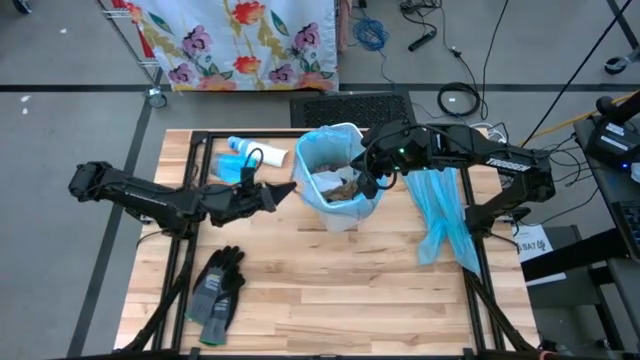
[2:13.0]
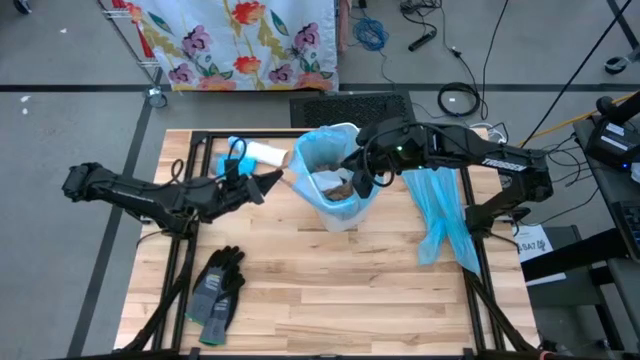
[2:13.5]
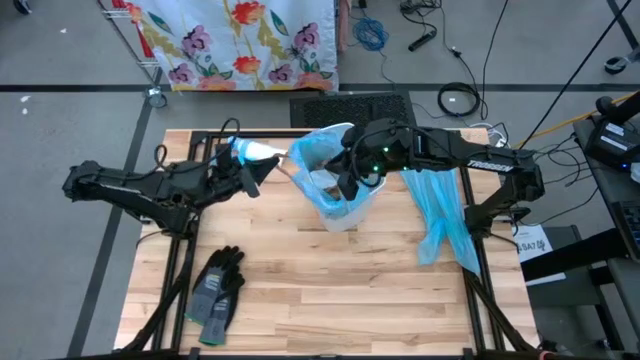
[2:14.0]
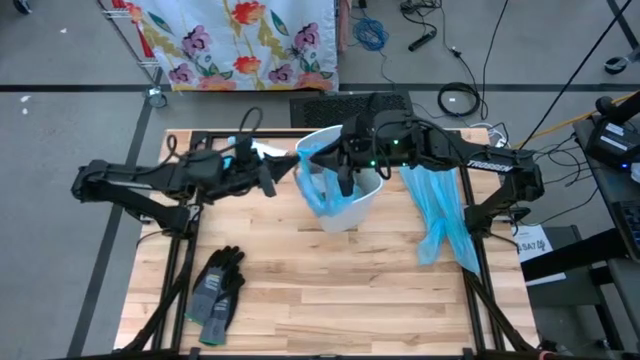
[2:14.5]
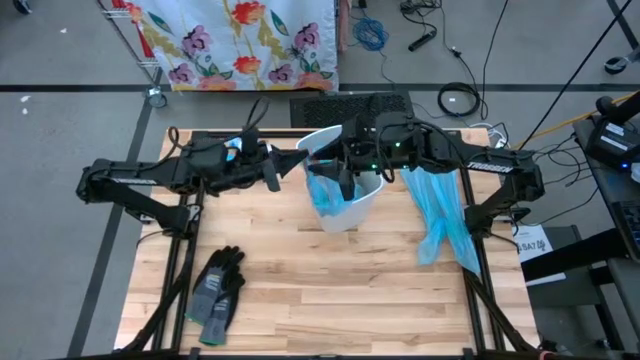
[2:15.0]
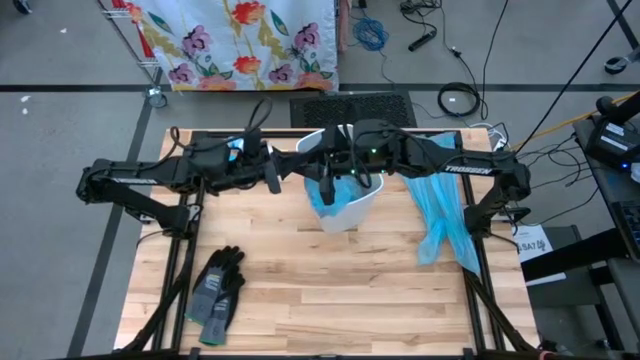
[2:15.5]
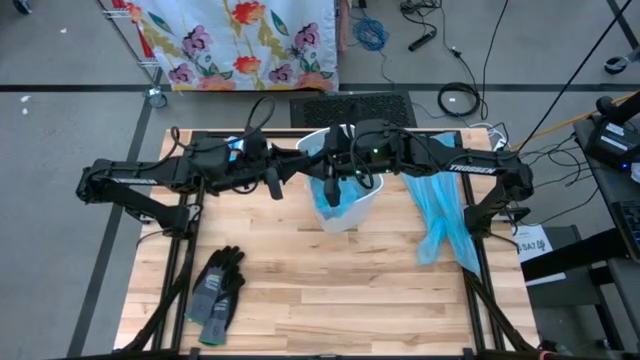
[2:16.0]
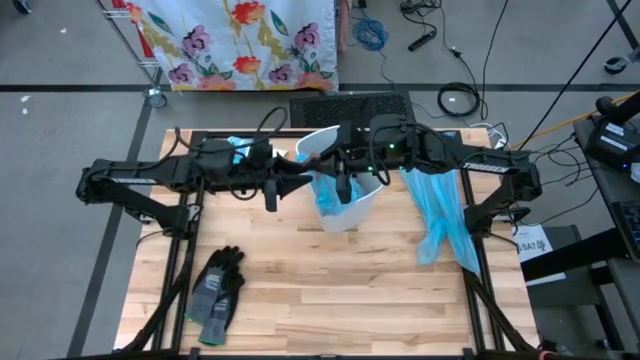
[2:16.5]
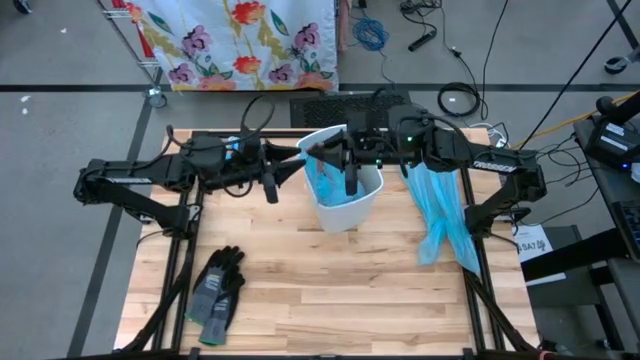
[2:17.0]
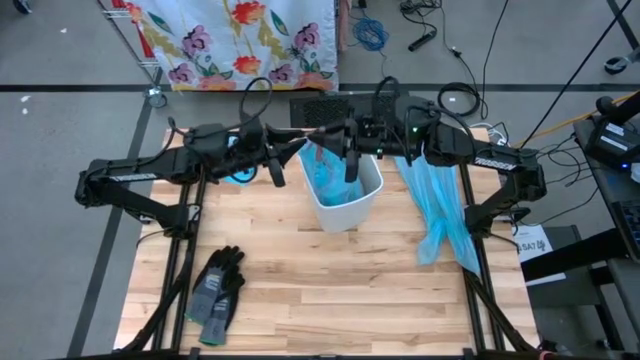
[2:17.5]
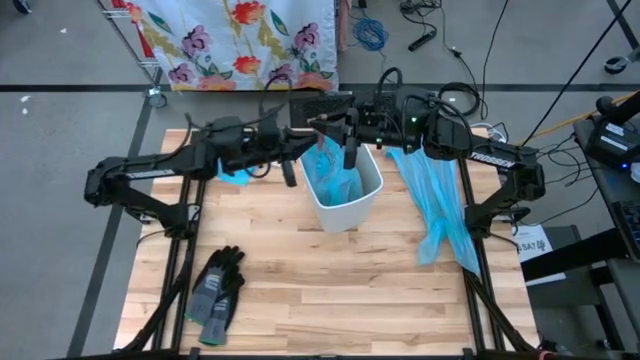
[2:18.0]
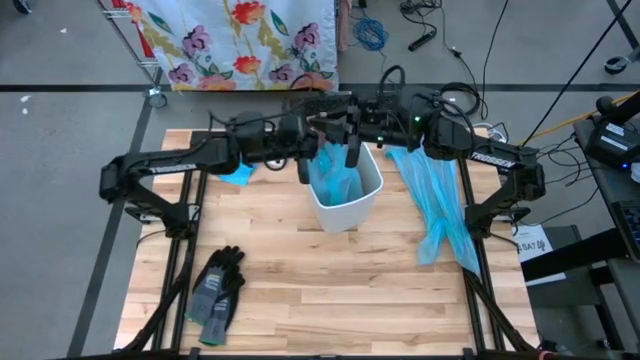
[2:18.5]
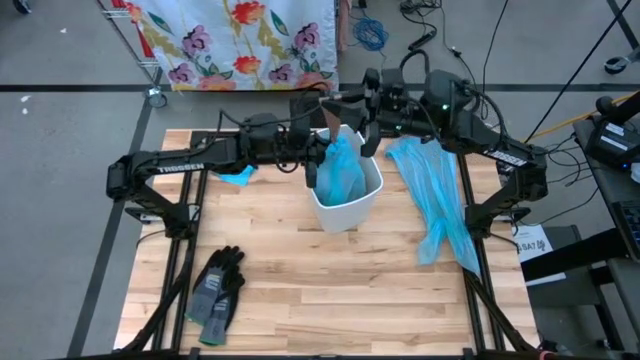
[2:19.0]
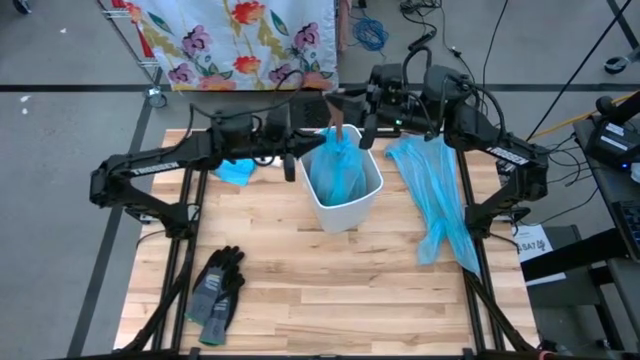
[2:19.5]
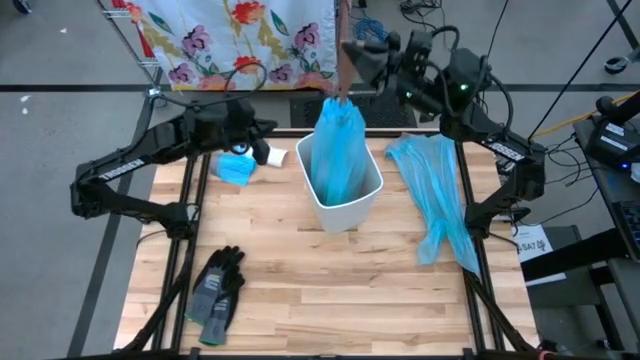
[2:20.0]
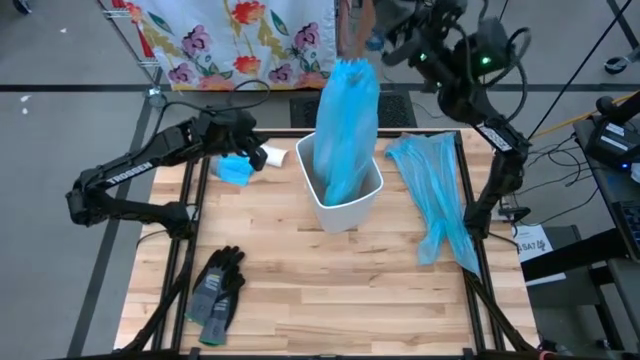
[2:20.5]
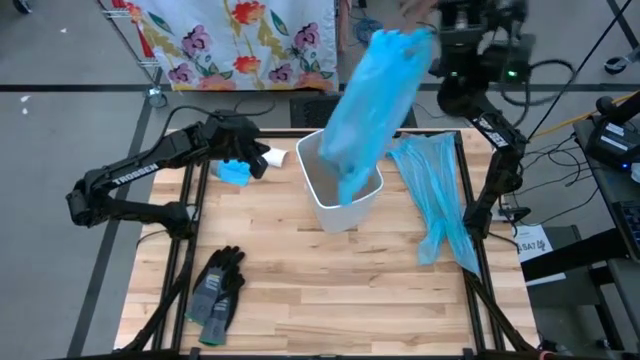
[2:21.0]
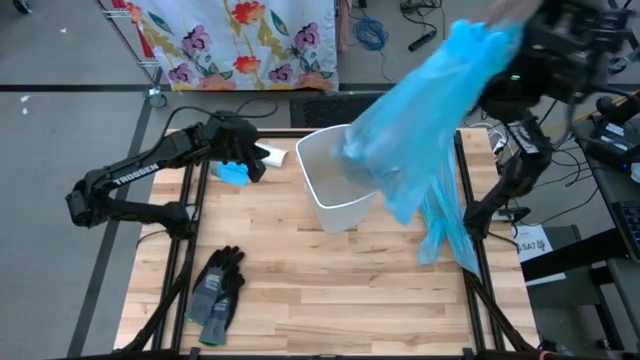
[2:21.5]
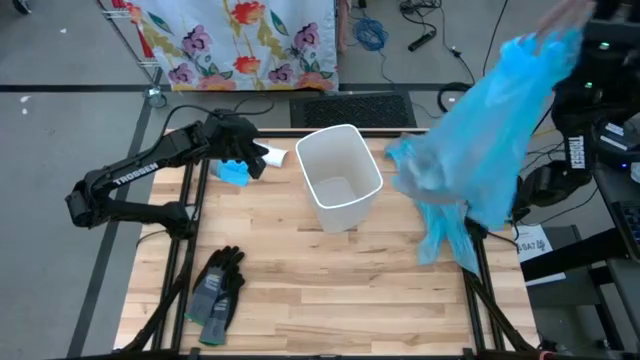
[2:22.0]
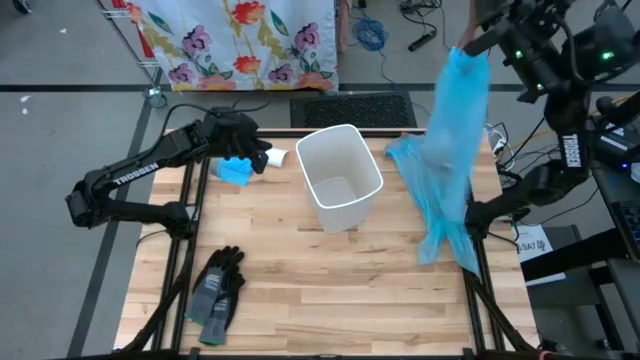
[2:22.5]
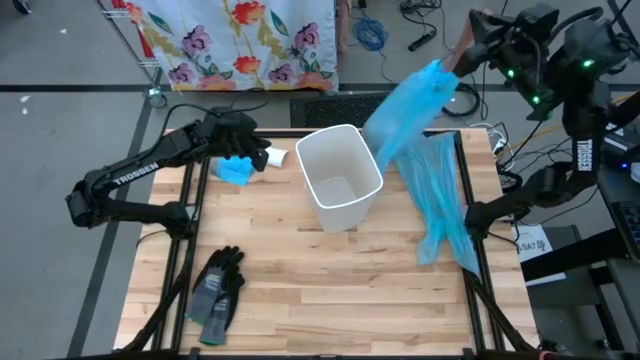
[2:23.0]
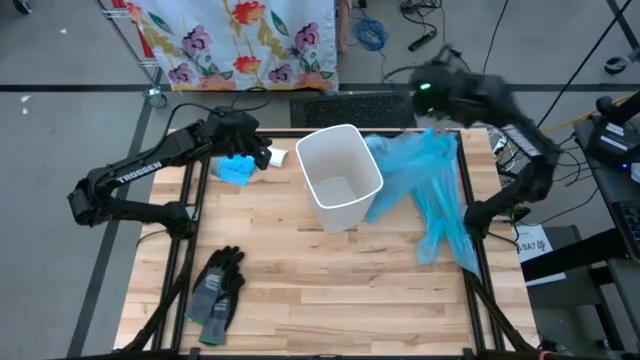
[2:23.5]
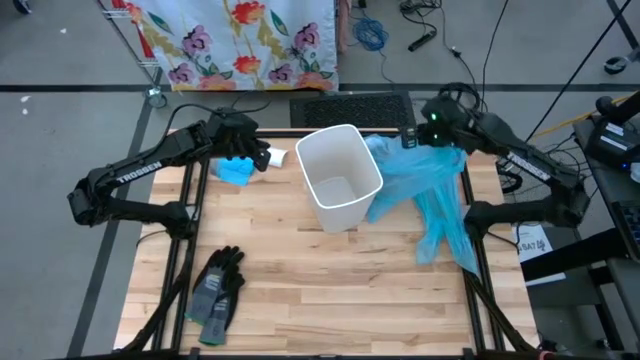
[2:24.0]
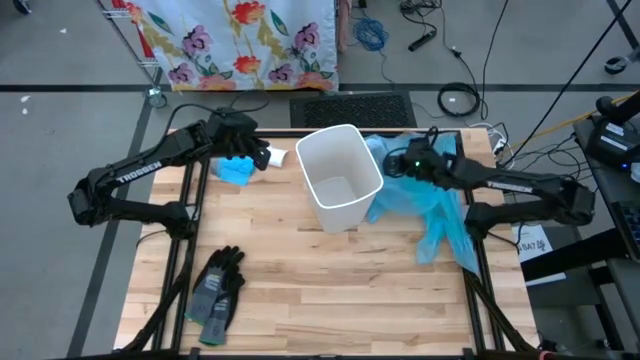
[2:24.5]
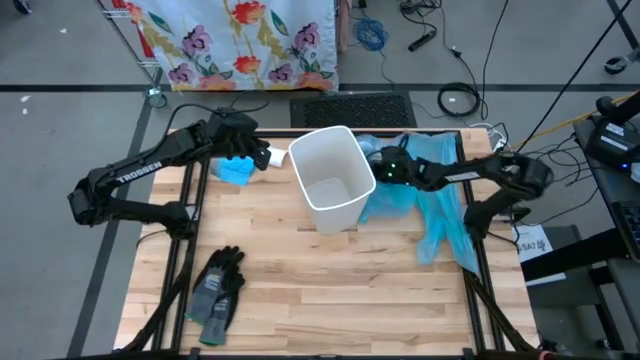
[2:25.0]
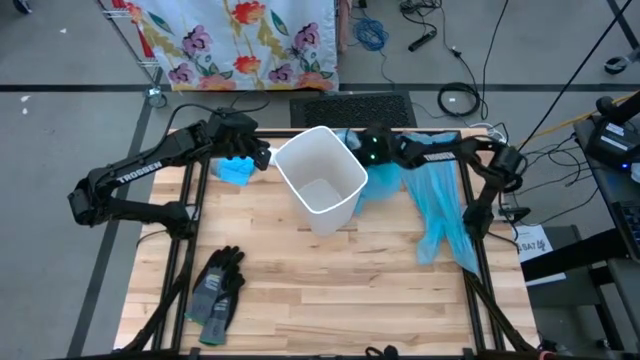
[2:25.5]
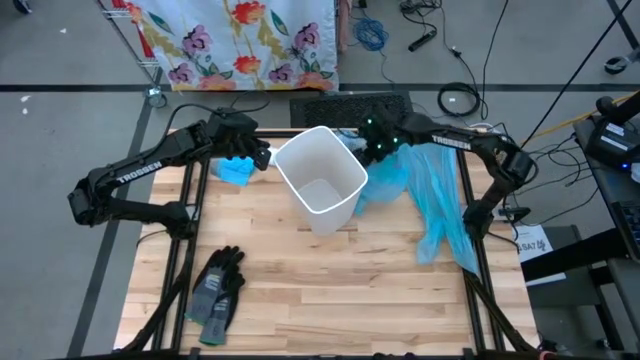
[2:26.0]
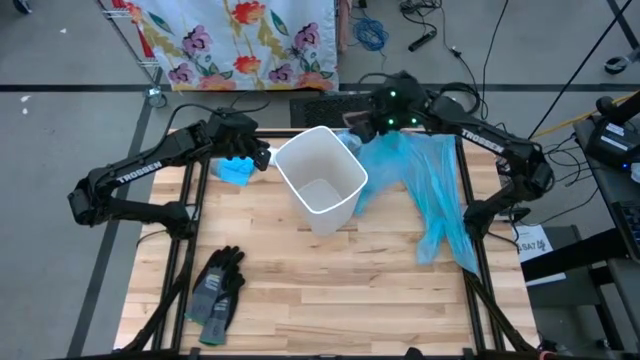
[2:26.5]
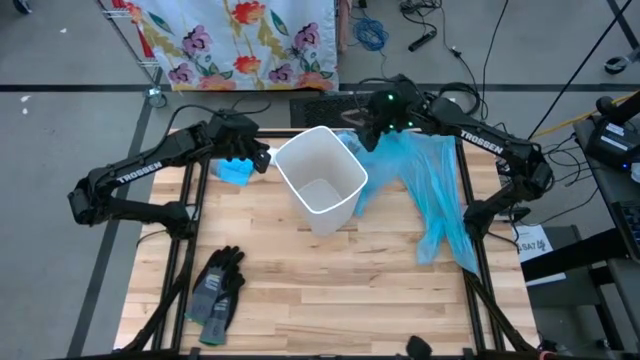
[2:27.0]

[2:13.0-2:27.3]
Task: place trash/remove bag and relplace
Remove trash bag from the trash bin

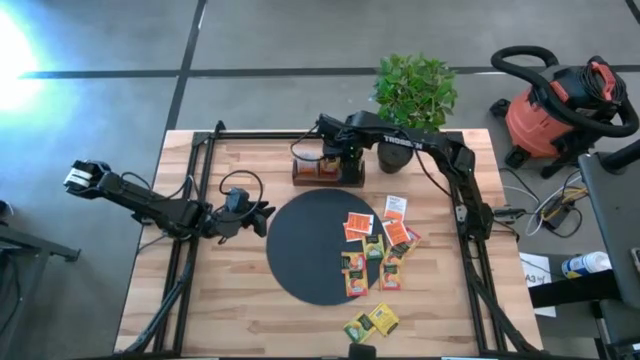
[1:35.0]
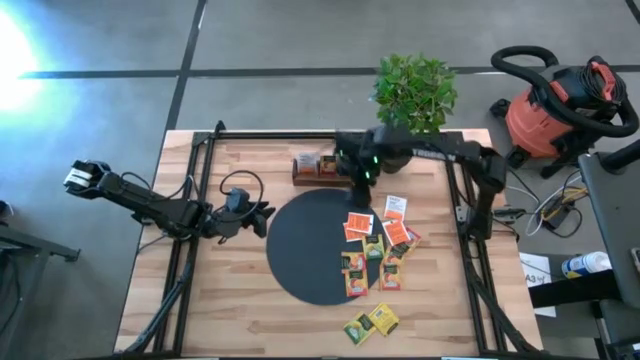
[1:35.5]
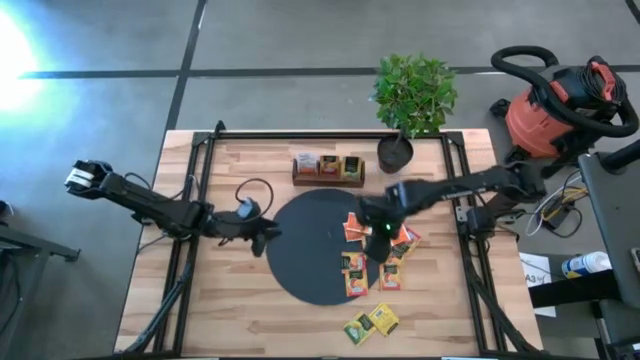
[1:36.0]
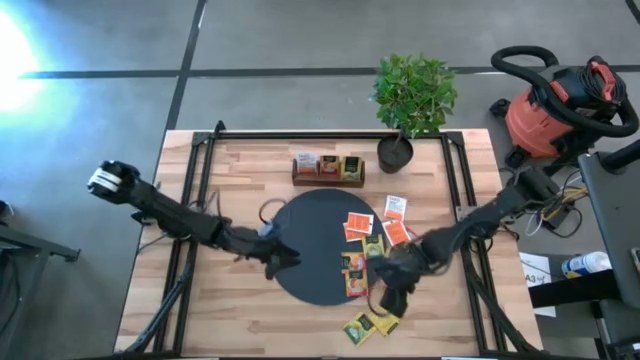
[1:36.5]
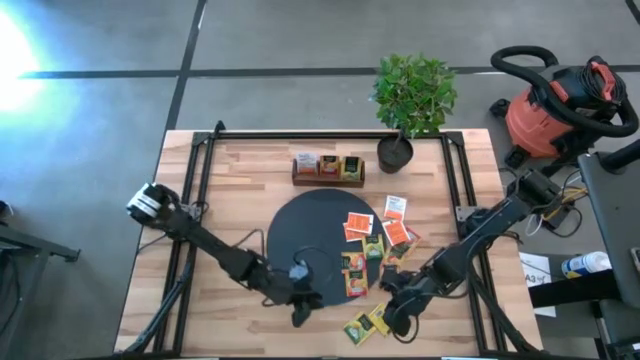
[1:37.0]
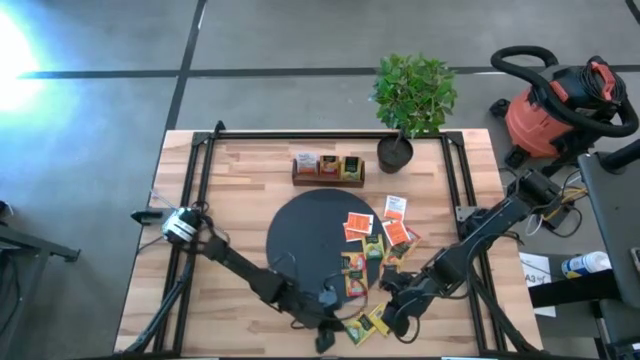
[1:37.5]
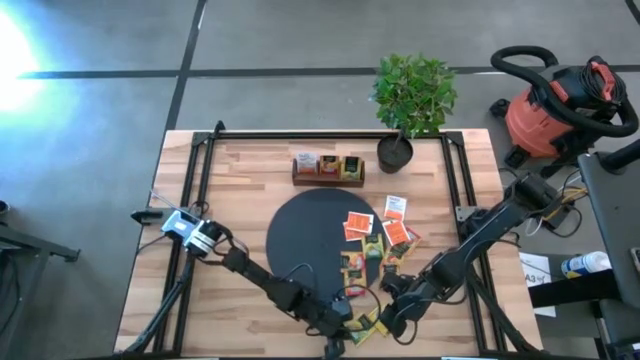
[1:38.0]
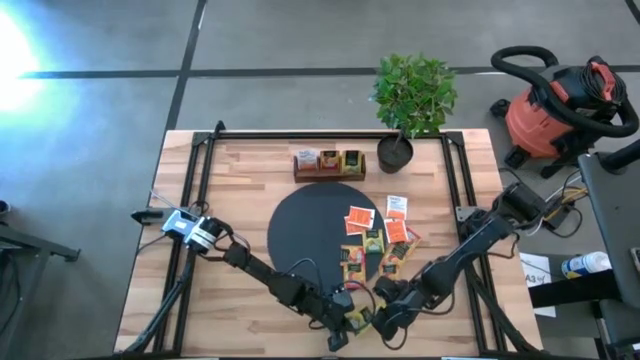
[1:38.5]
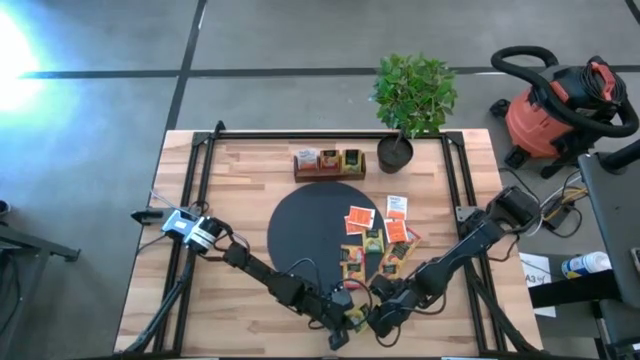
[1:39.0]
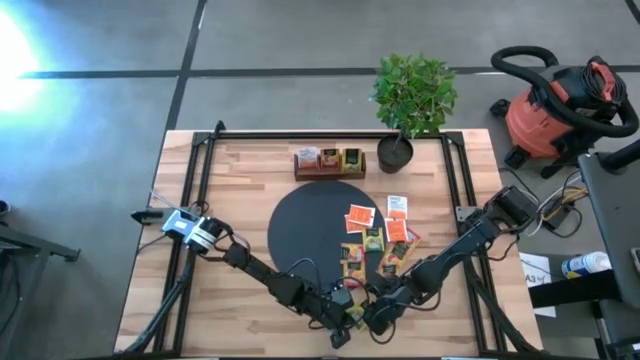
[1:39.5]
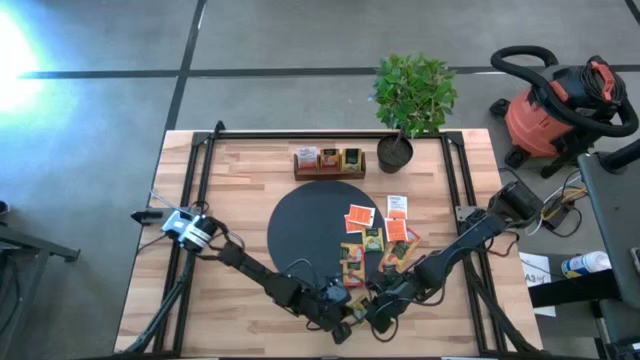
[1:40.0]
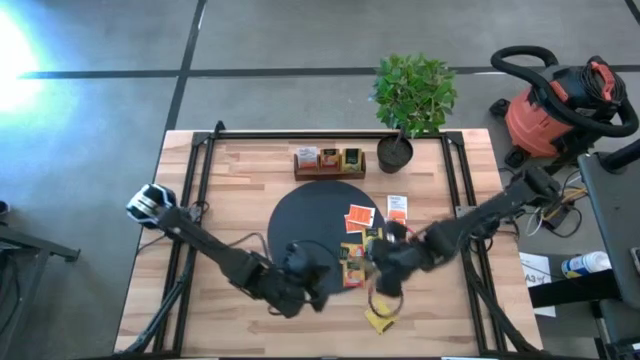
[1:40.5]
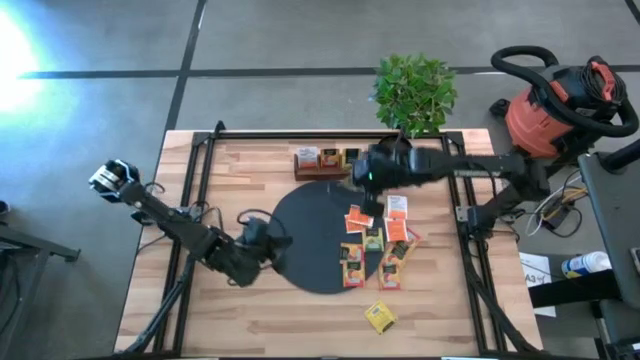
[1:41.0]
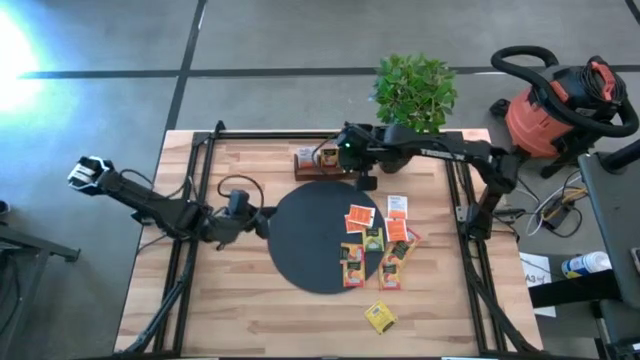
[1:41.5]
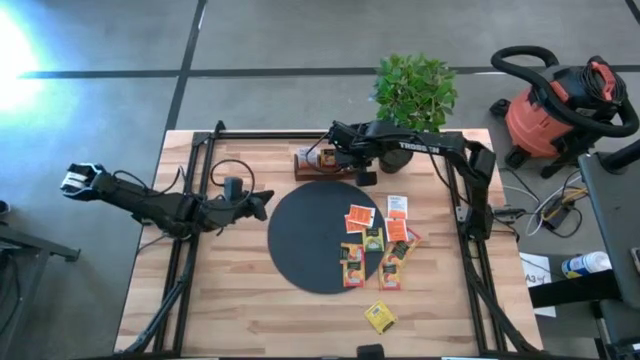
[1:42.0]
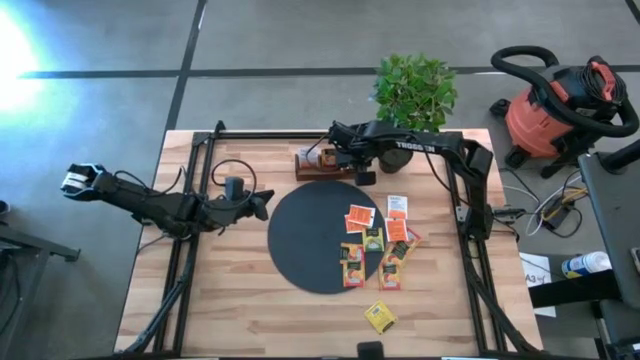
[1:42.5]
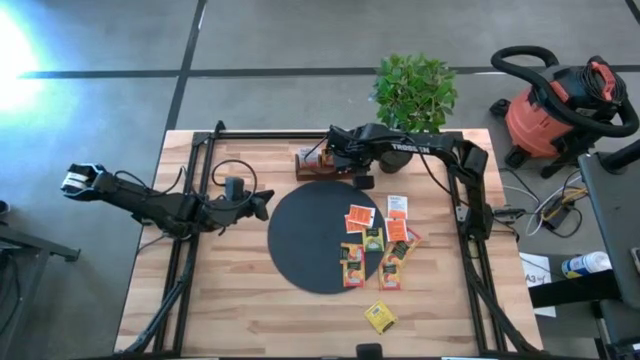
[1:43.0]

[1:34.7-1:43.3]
Task: Pick & Place Tea
Put the yellow tea bag into the right section of the brown wooden organizer
